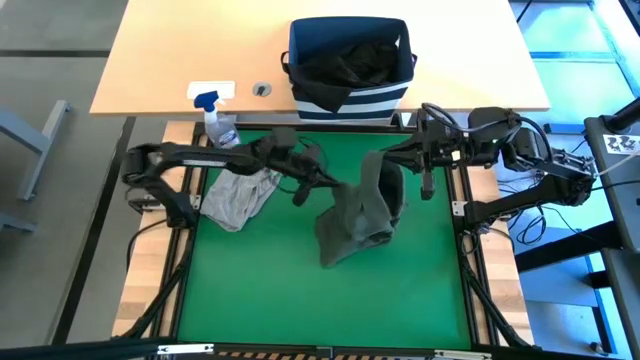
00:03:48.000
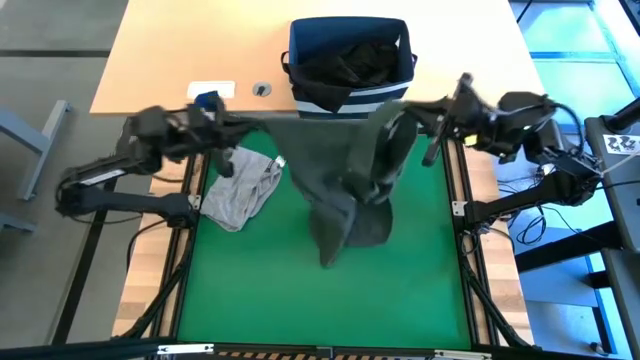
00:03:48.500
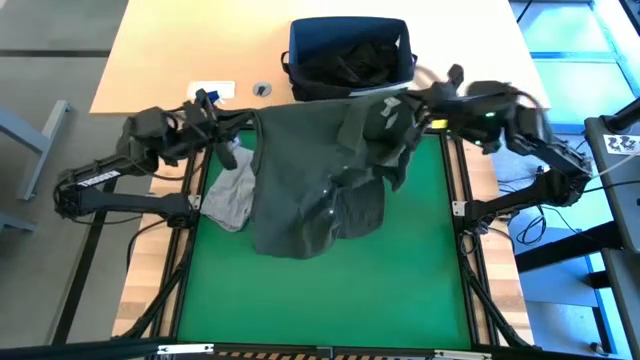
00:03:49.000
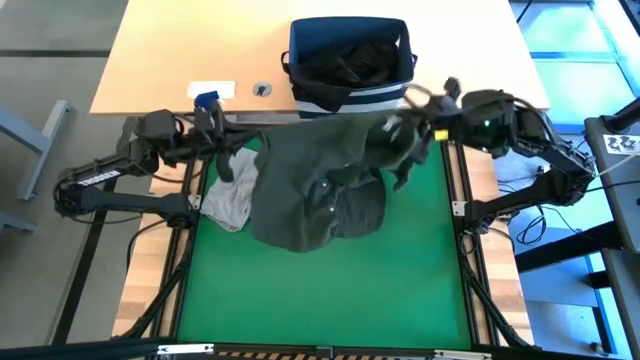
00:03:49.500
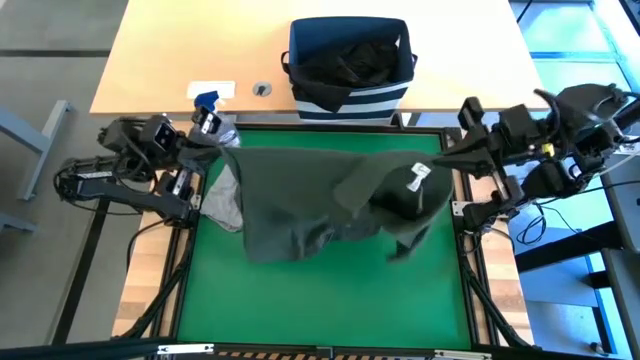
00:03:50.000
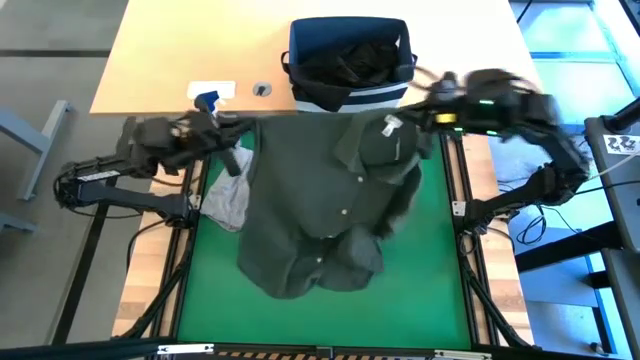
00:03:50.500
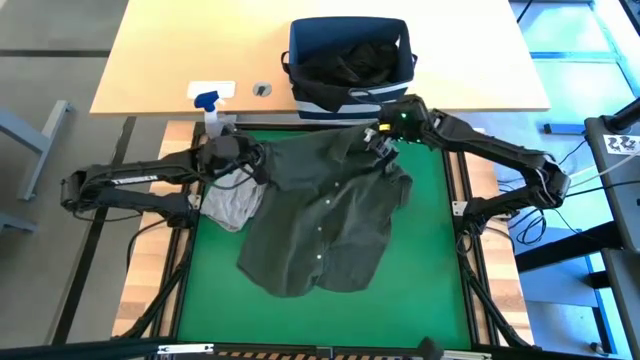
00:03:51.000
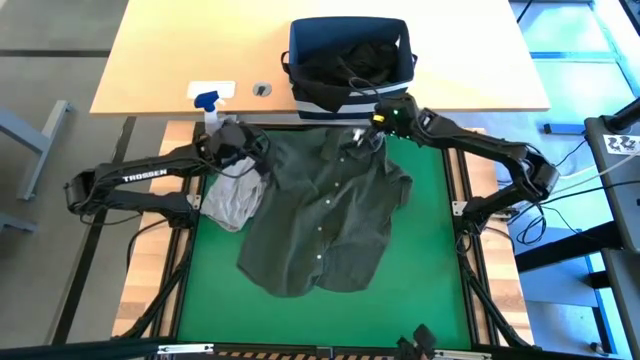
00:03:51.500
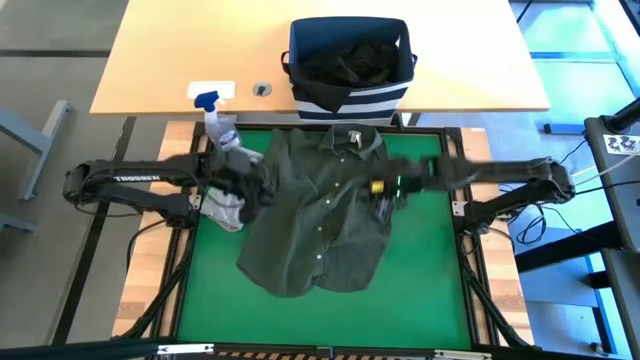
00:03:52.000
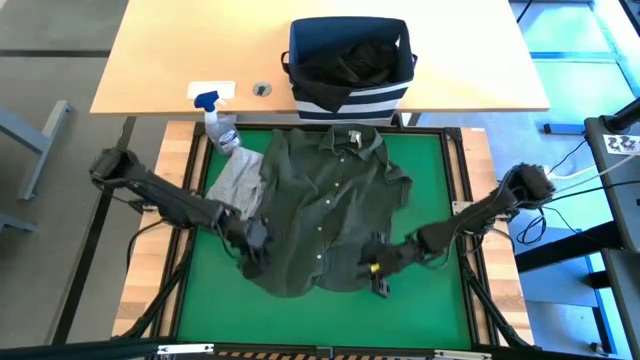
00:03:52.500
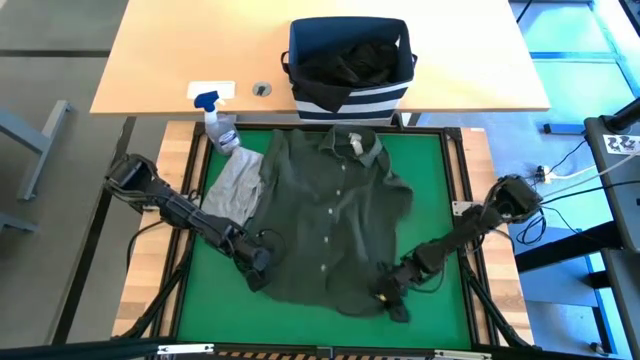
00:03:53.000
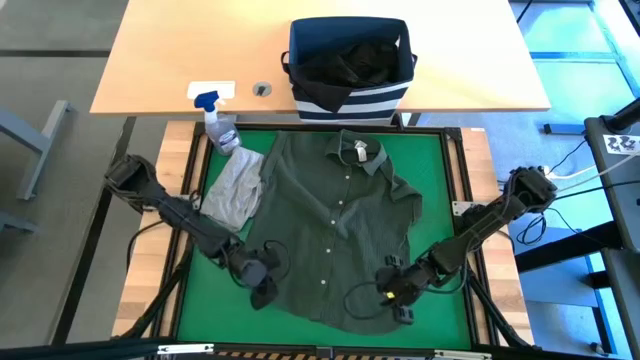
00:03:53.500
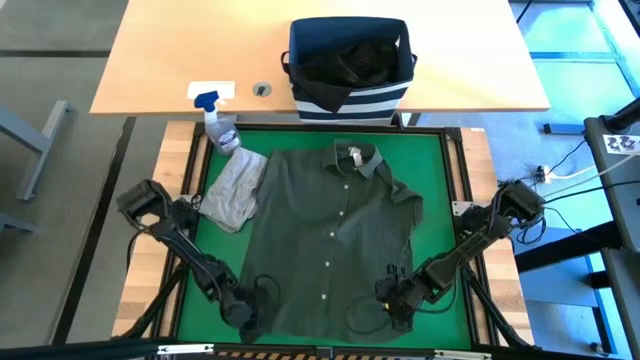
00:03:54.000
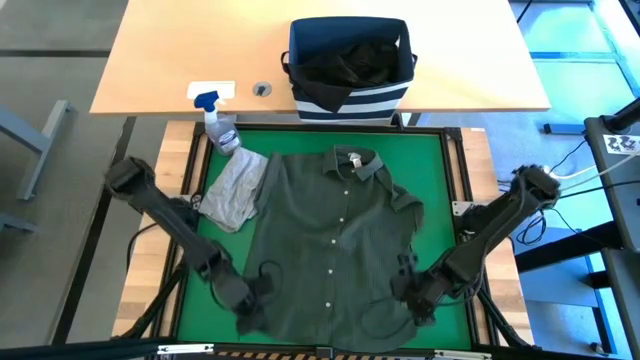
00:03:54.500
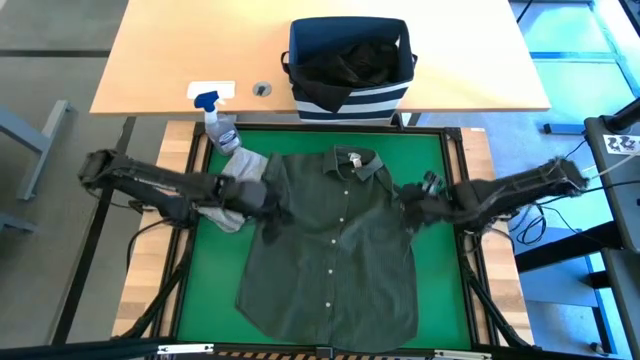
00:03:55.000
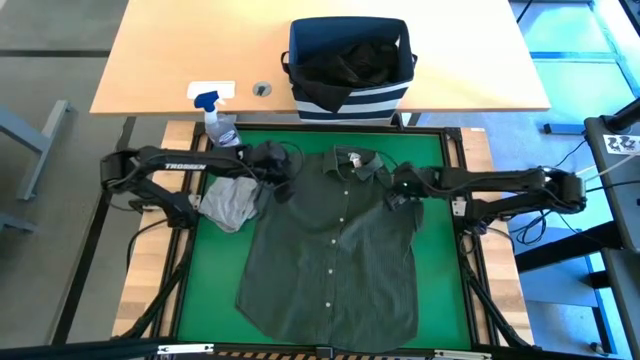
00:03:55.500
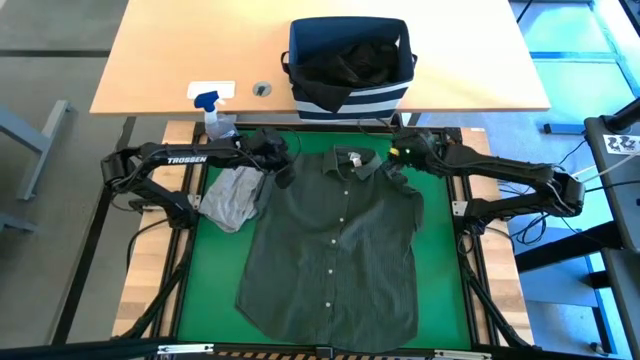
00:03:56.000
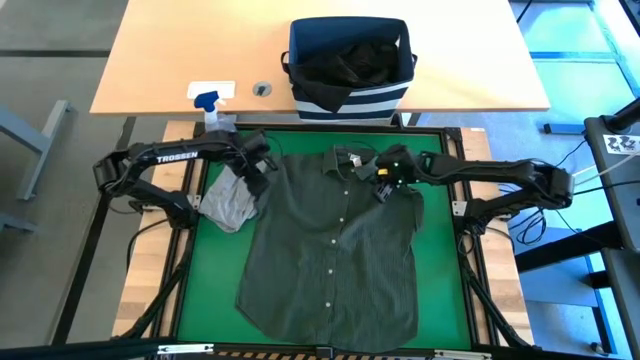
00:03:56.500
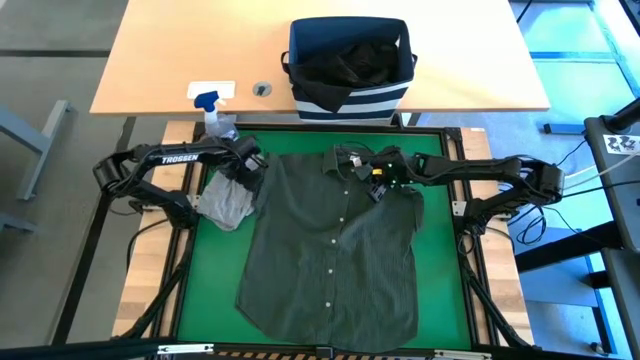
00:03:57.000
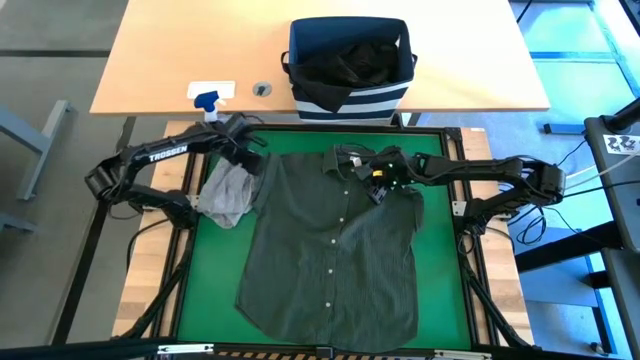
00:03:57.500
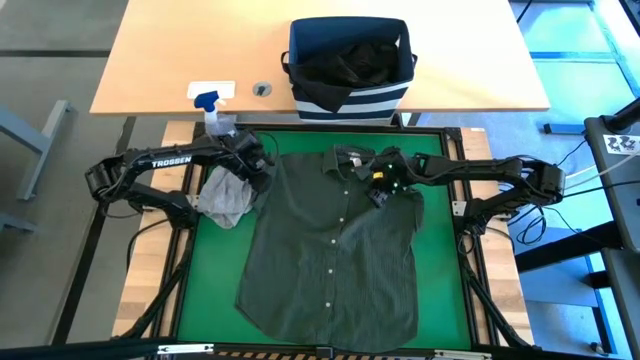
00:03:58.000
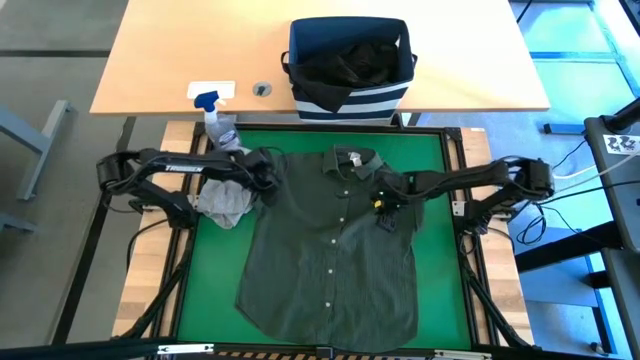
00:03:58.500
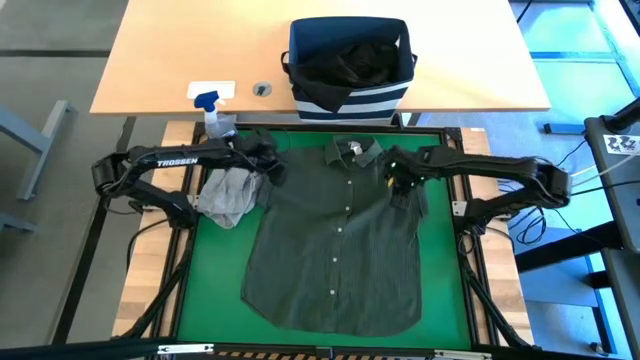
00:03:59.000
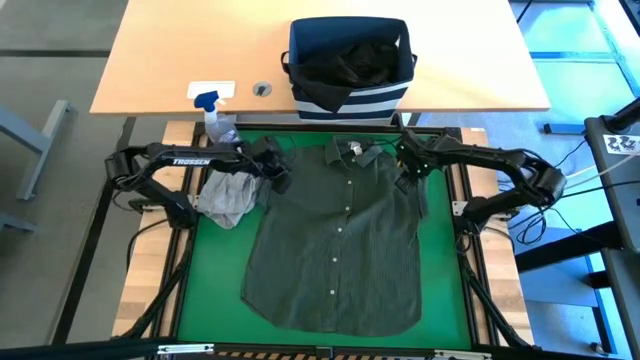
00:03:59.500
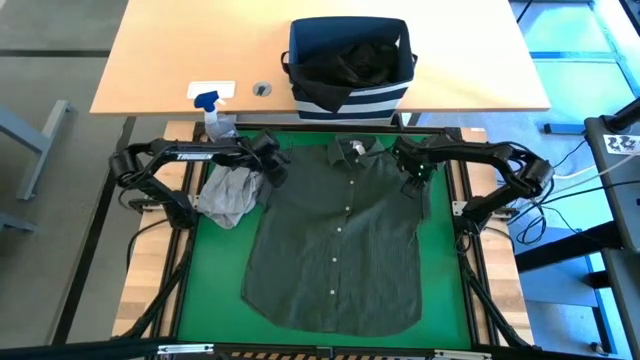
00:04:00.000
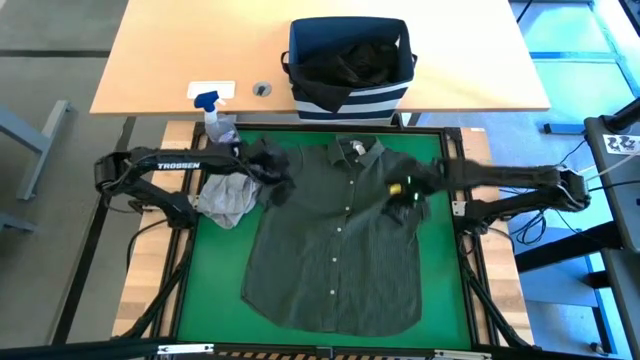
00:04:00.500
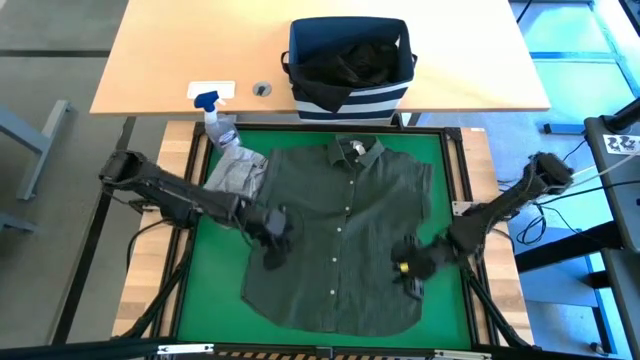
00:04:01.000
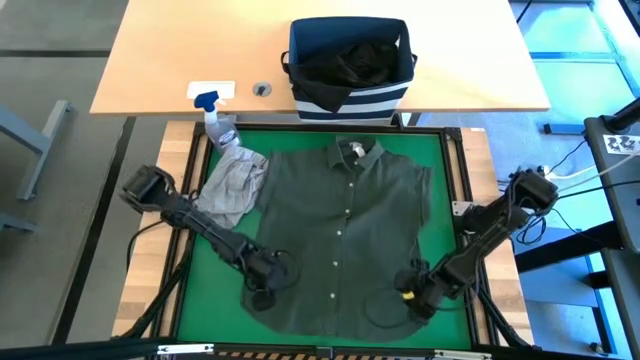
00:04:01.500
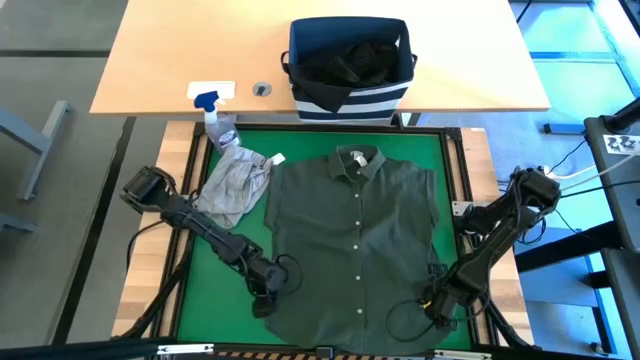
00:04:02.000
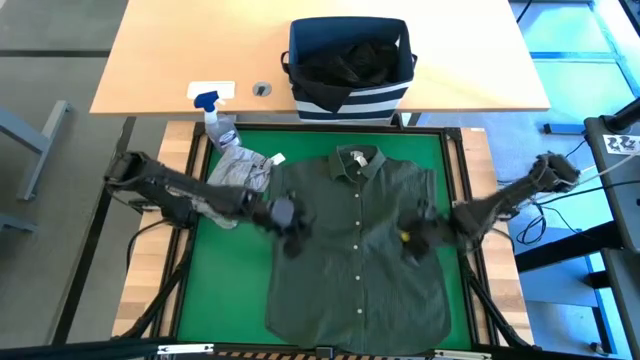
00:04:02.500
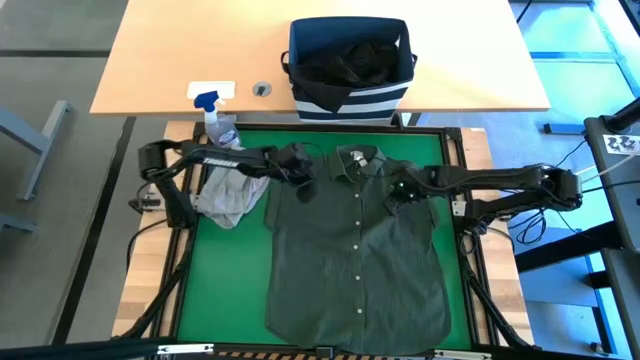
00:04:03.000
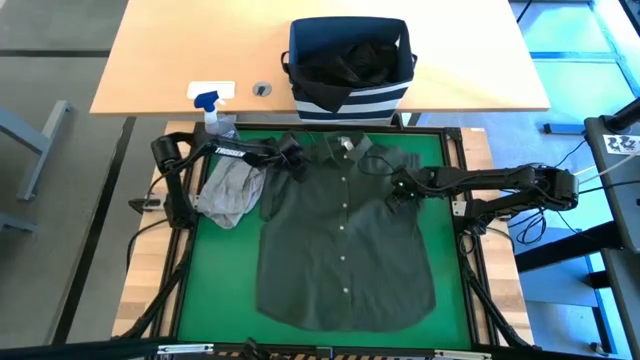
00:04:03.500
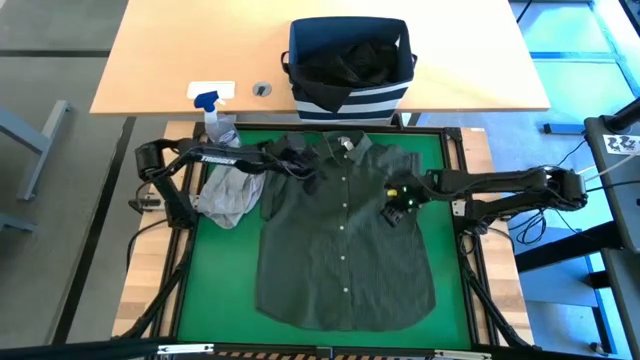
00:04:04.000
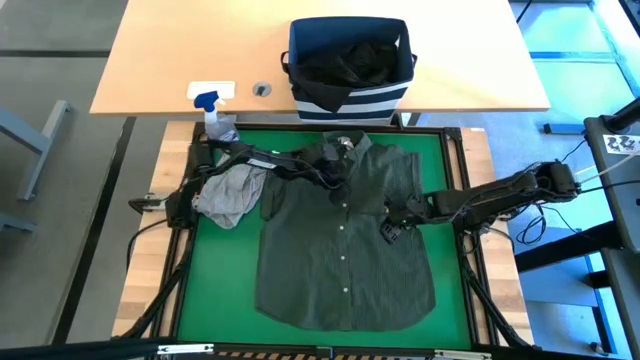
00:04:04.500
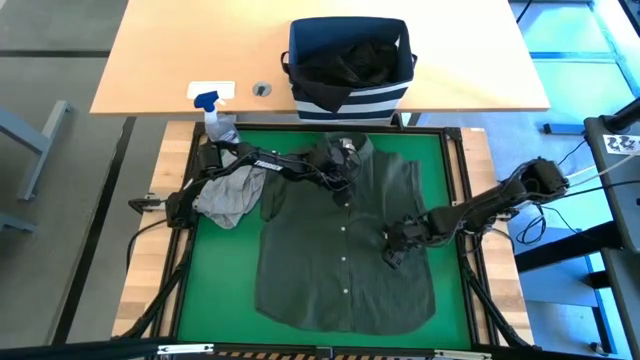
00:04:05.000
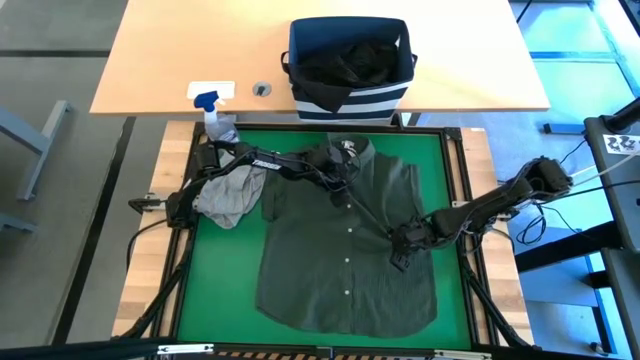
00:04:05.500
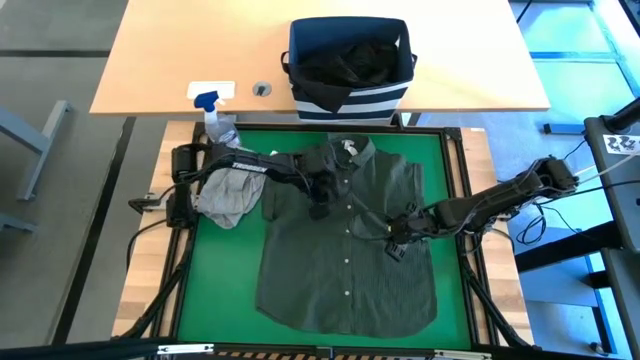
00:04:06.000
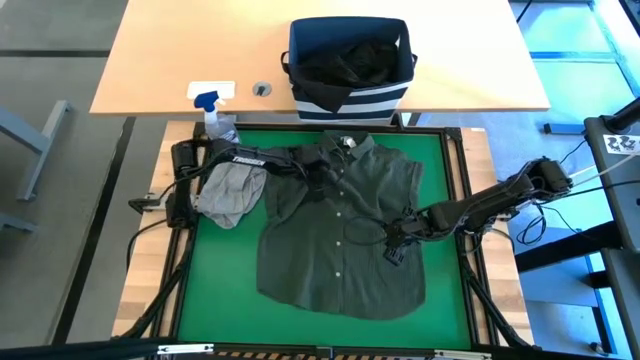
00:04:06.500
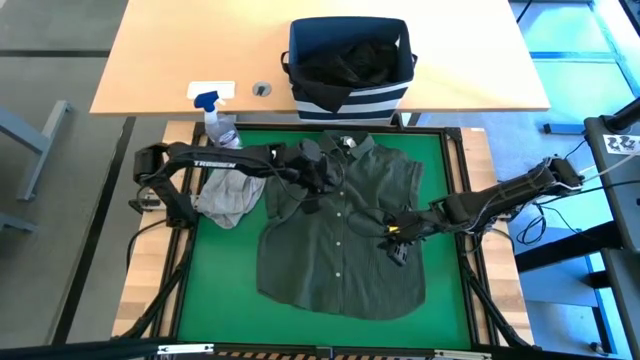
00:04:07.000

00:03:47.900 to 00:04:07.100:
Task: Fold Laundry from Bin
Fold the green shirt

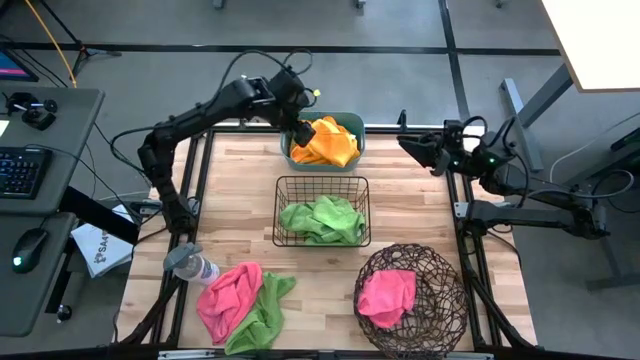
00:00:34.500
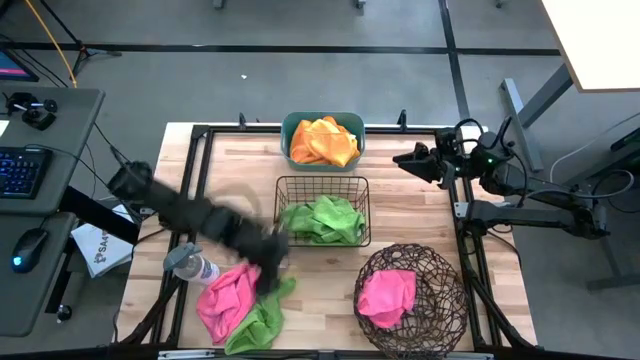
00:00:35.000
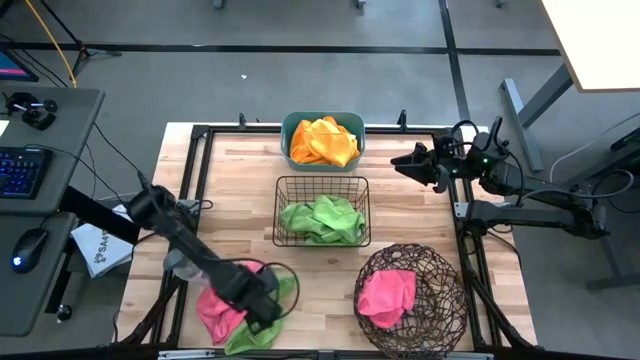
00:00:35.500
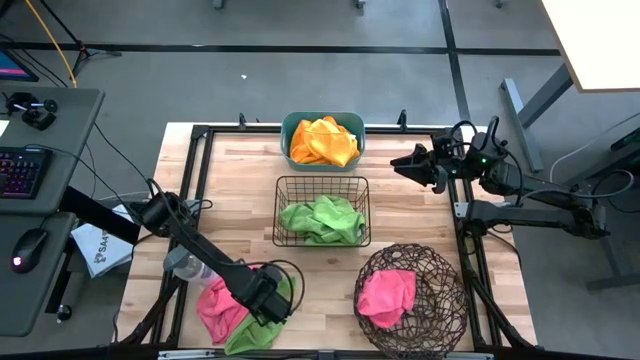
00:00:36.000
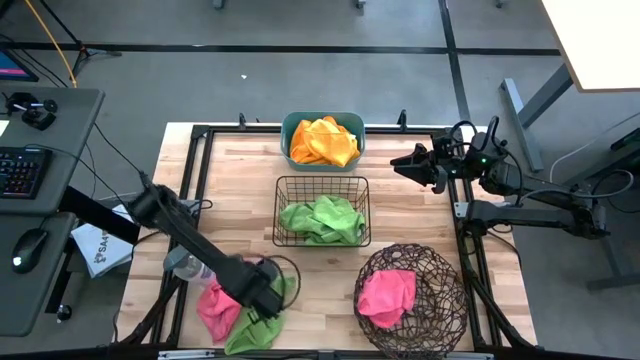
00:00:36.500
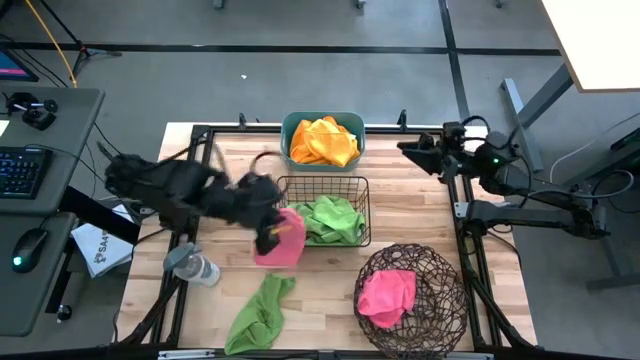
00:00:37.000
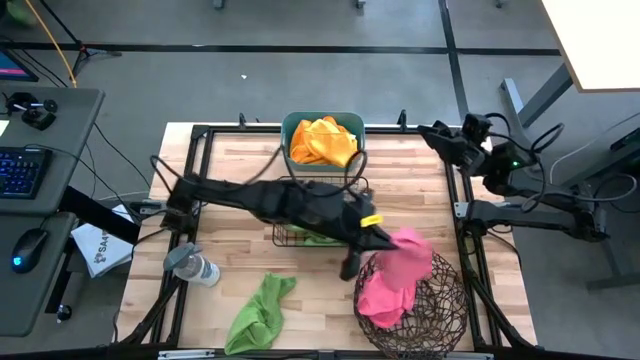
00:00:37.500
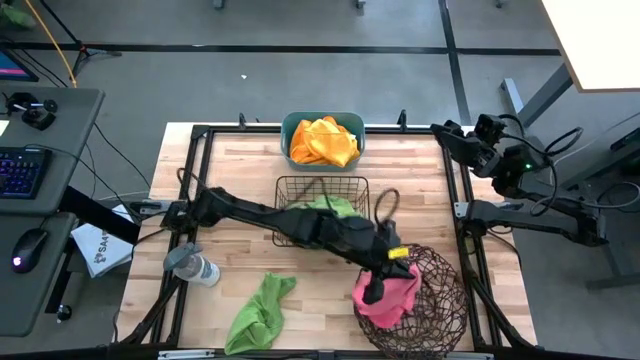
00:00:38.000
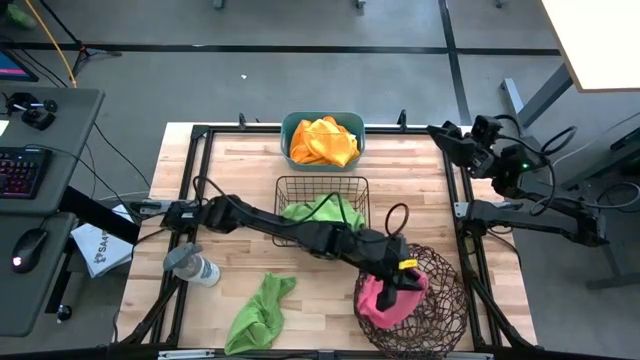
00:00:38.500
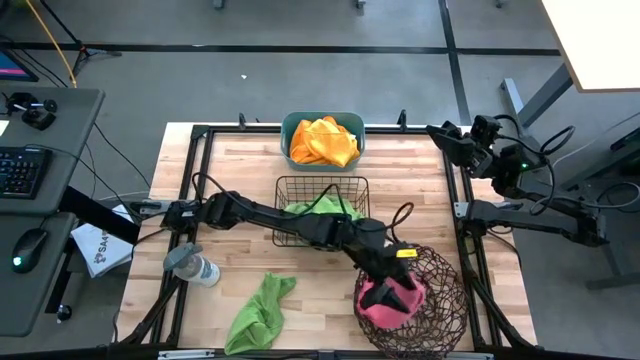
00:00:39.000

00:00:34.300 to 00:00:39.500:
Task: Sort microfiber towel by color & place in baskets
Put the pink microfiber cloth into the black wicker basket
